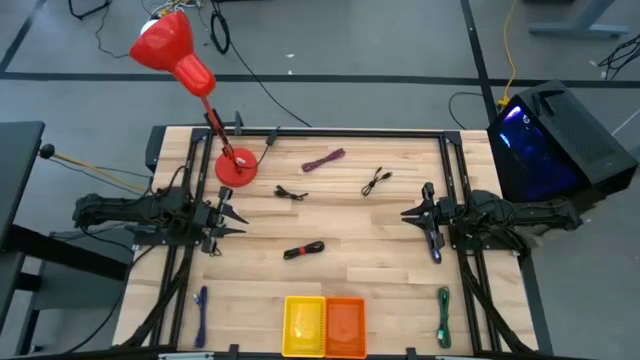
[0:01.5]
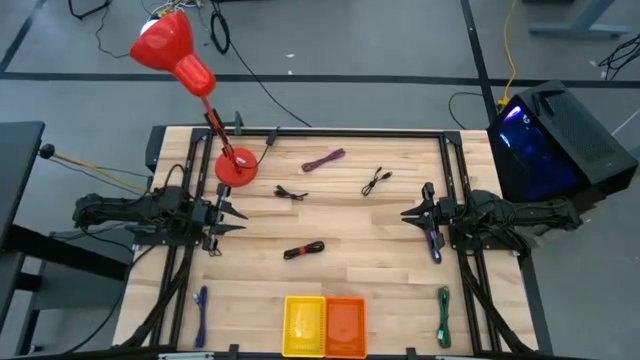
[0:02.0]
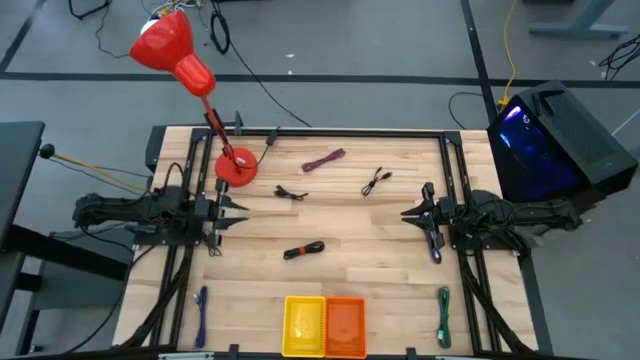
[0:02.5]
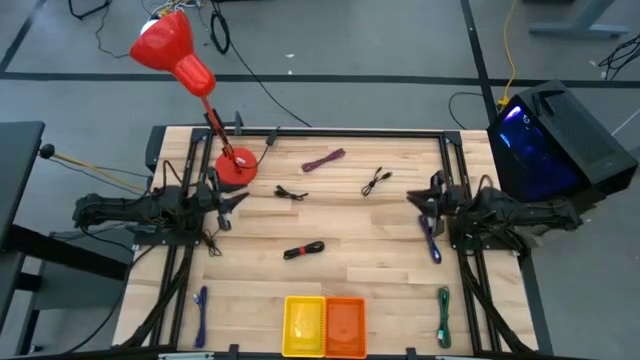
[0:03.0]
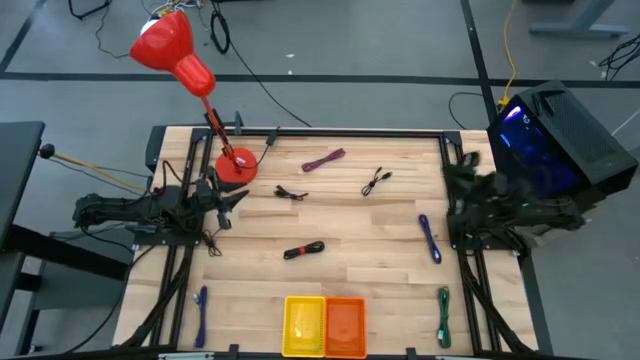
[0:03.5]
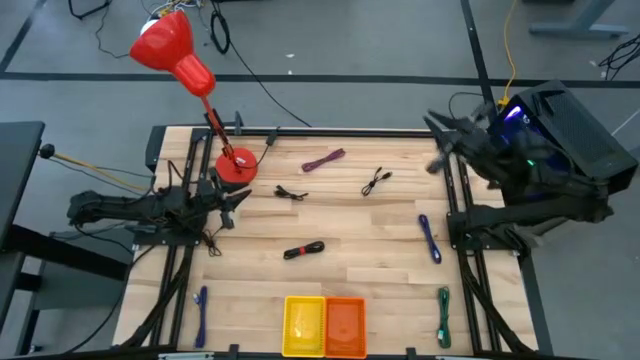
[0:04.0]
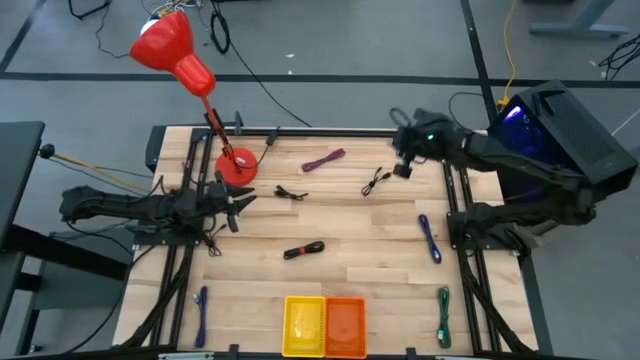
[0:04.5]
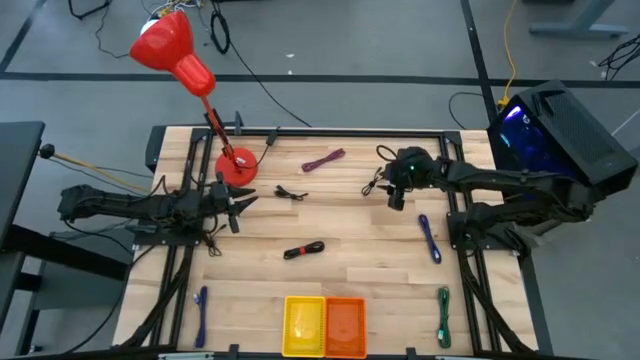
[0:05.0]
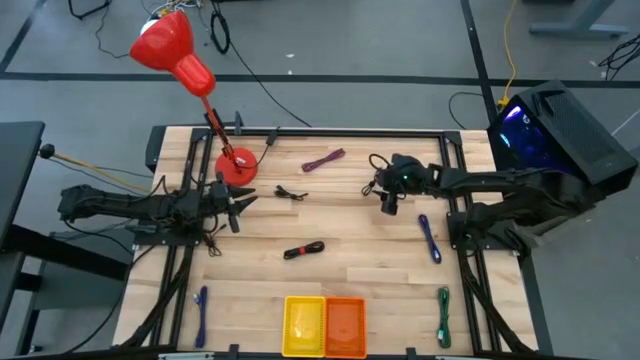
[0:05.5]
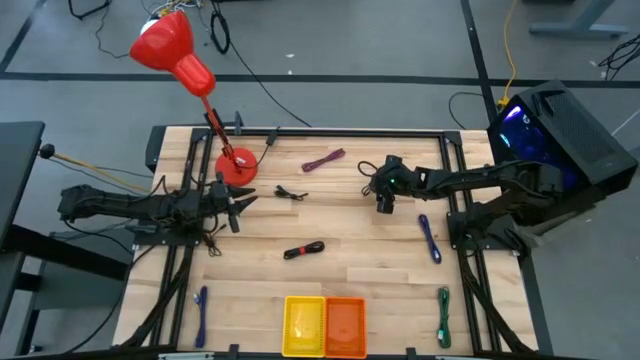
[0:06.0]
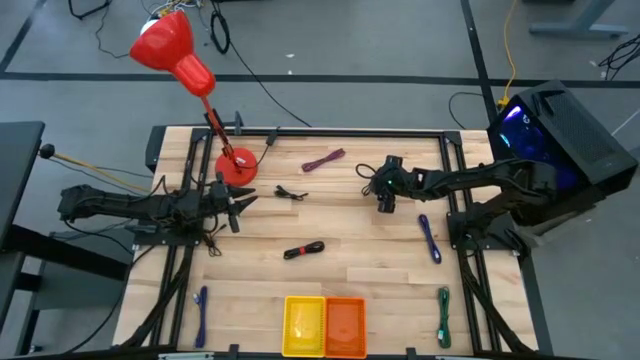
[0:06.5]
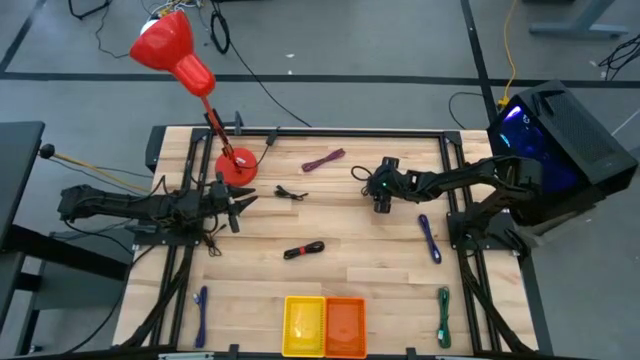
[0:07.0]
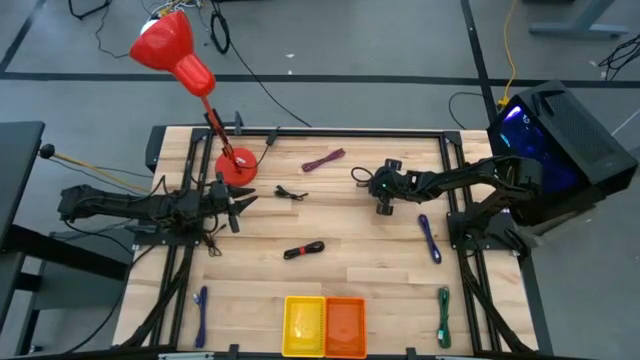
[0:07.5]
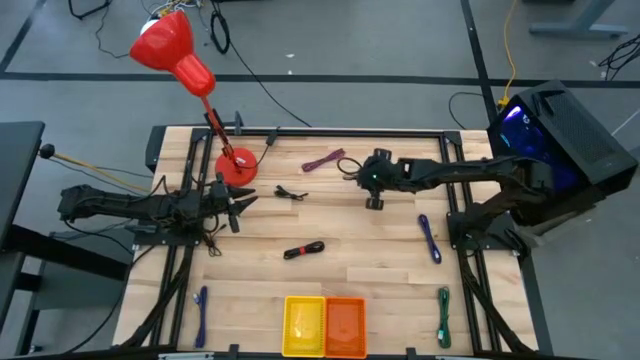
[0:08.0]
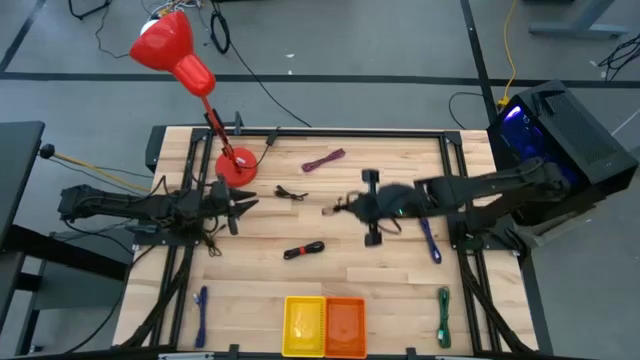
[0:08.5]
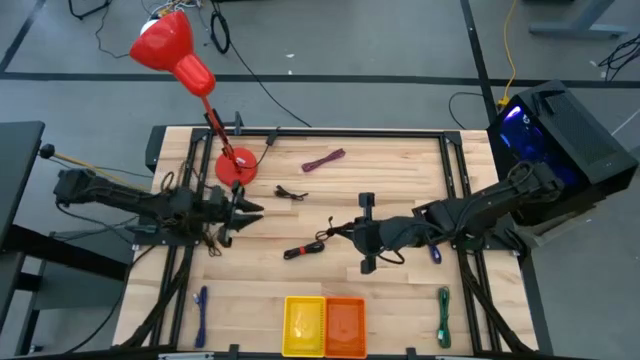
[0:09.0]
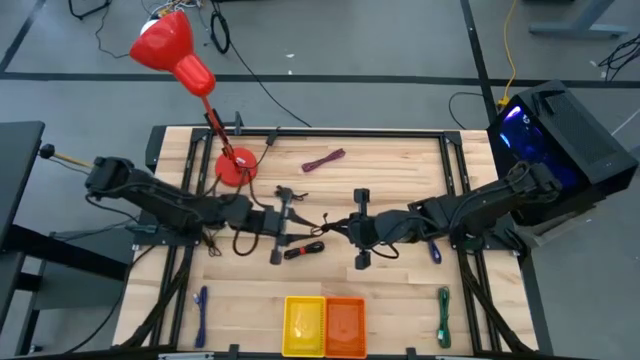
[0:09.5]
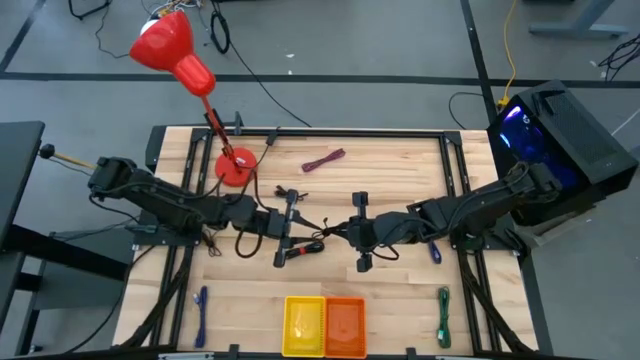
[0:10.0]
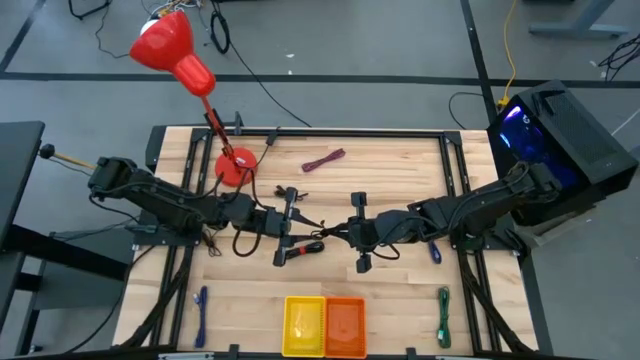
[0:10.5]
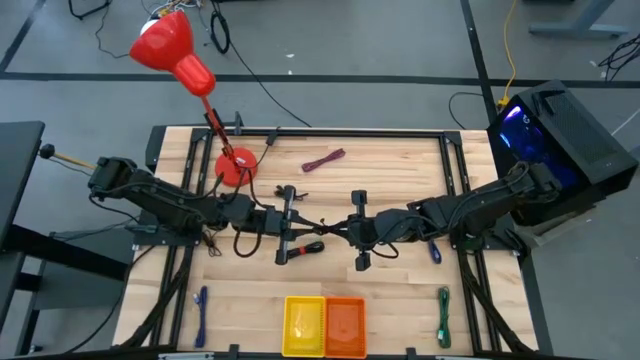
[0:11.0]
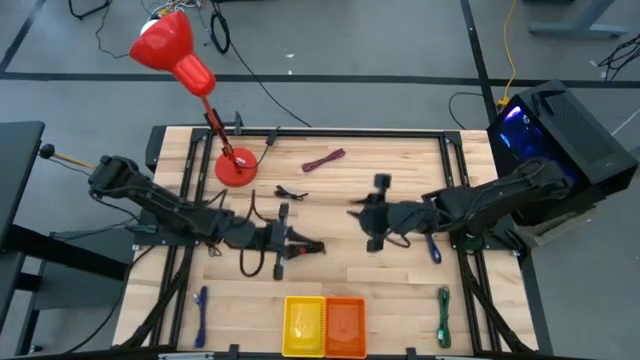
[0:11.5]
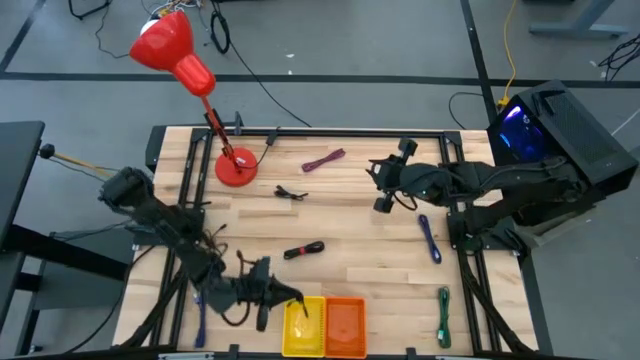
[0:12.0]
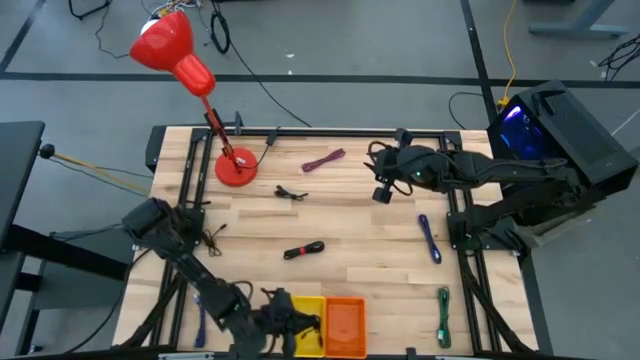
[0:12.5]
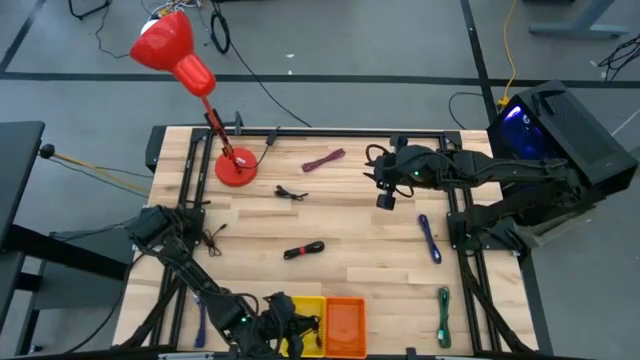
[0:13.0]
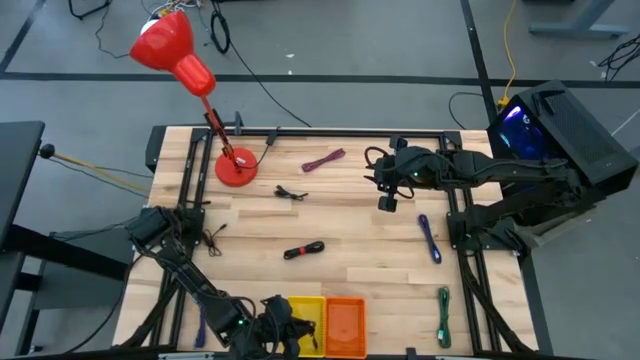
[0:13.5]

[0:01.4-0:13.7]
Task: Pick & Place USB Port
Put the black charger cable into the yellow bin

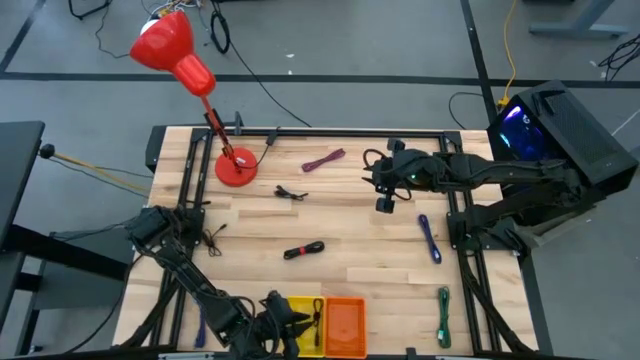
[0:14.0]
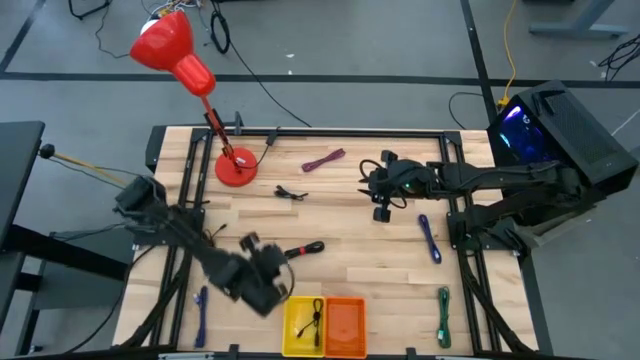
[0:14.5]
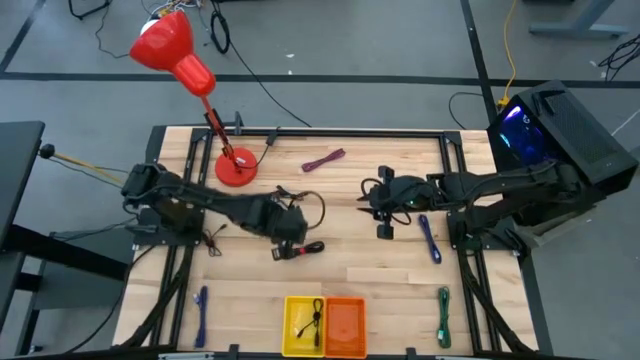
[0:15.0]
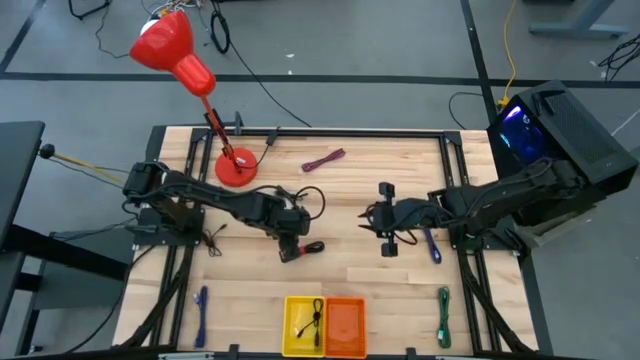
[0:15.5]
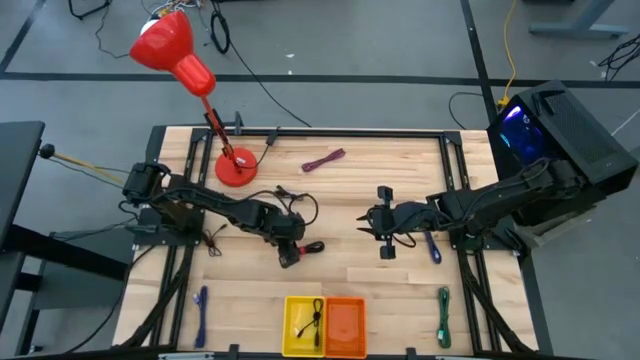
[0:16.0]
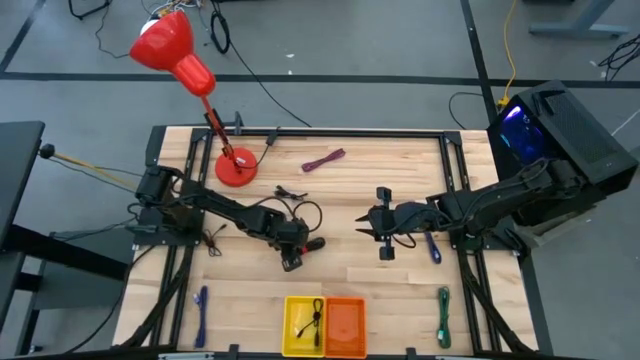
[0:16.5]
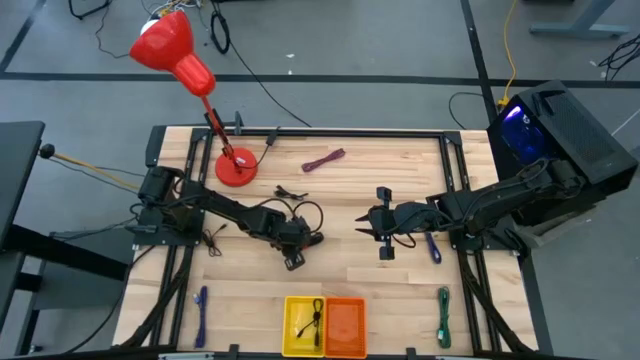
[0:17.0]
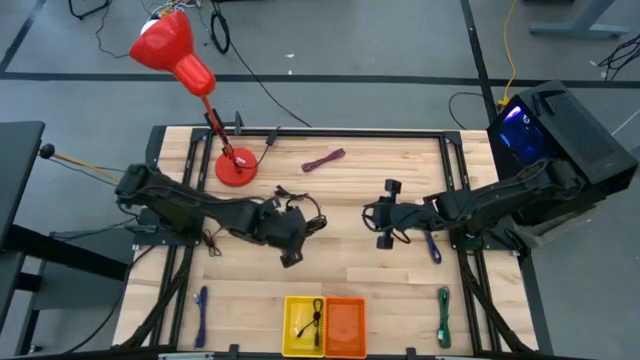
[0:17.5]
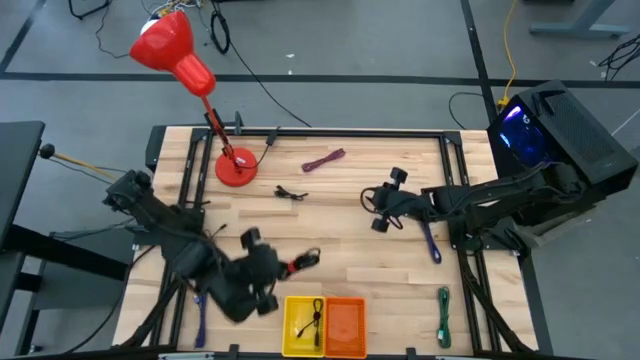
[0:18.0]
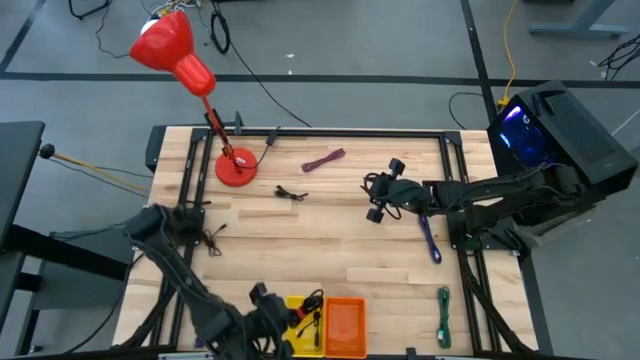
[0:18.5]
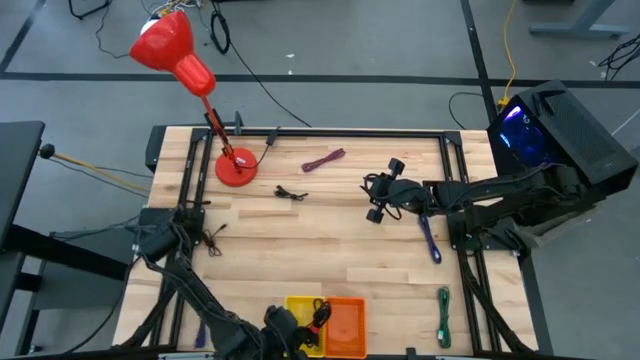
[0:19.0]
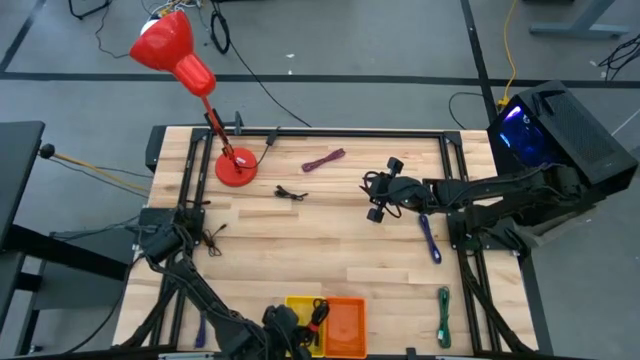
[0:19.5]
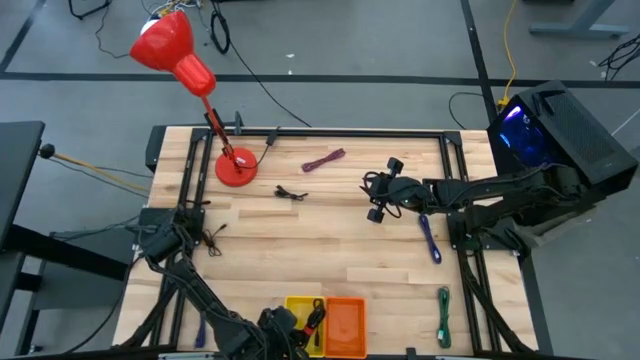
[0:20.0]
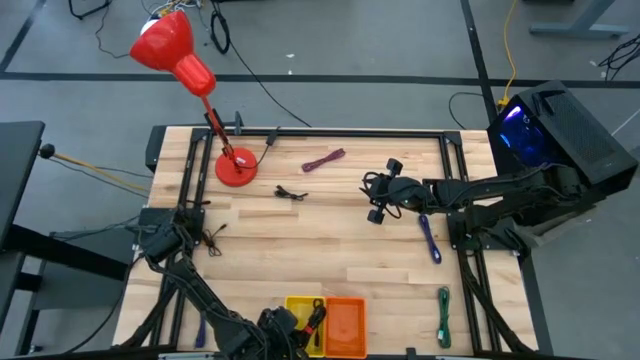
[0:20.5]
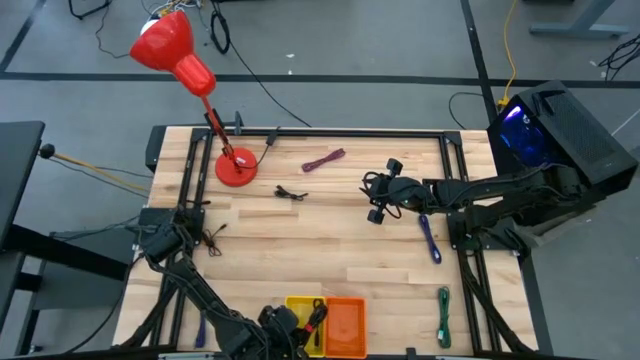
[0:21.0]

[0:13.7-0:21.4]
Put the black charger cable into the yellow bin

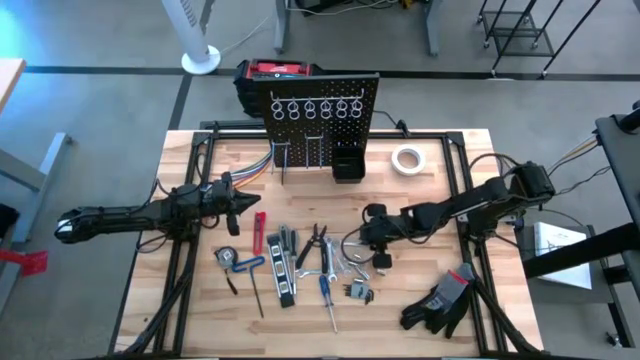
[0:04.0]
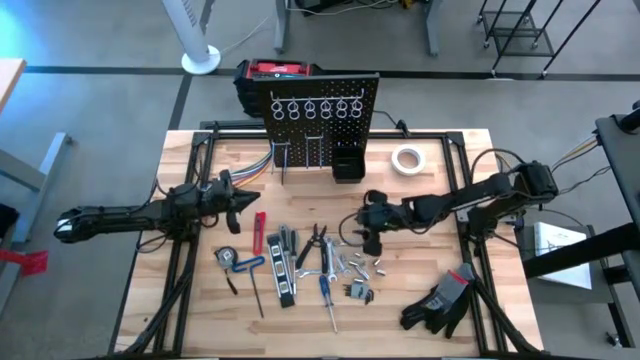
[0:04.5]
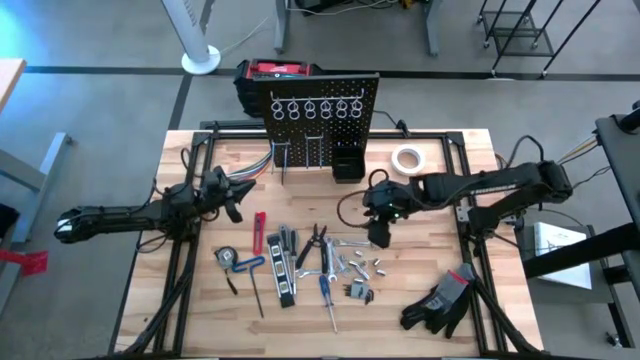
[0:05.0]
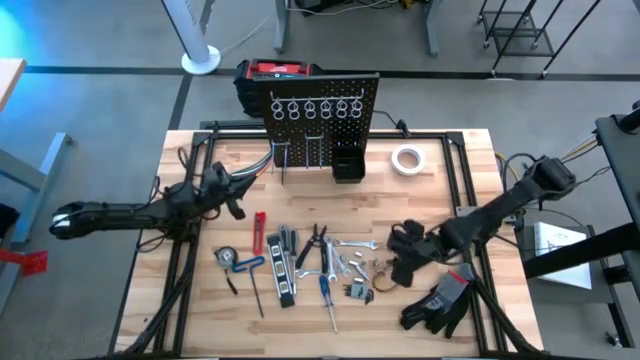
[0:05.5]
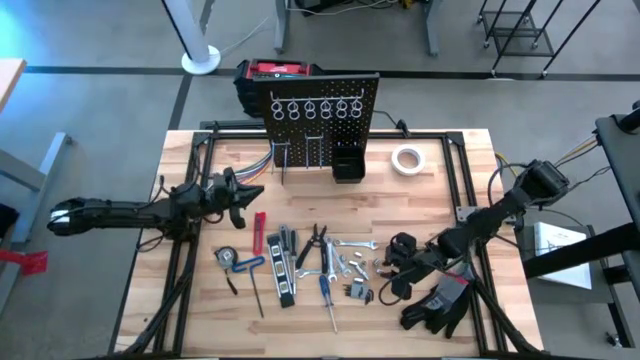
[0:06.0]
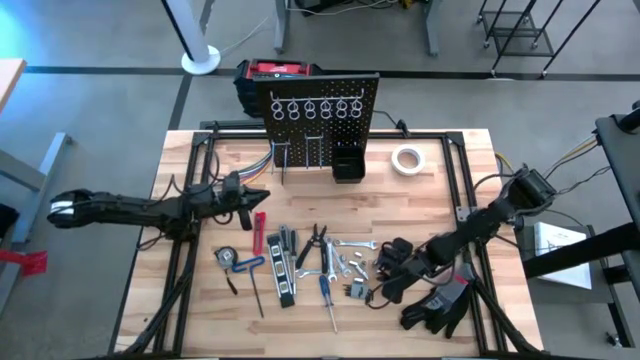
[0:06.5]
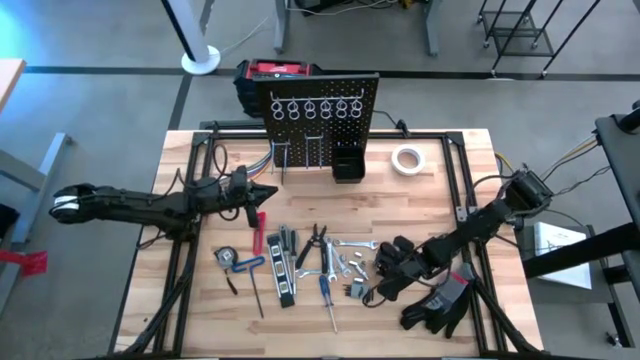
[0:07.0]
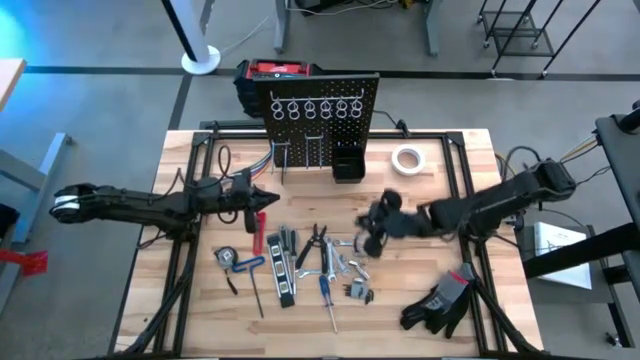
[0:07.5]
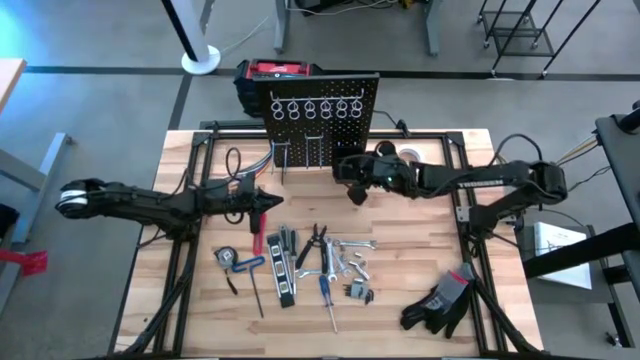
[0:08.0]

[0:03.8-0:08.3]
Task: Hang tools onto peg board
Put the socket into the black tool bin on the peg board
